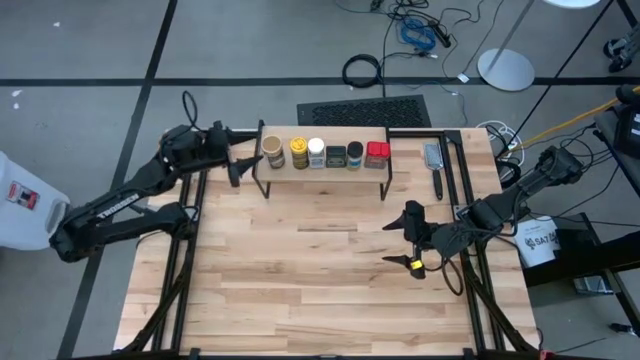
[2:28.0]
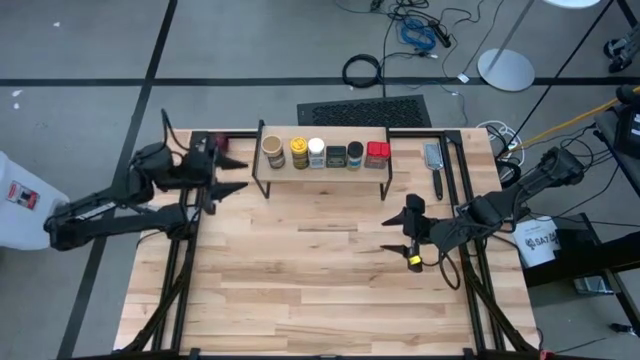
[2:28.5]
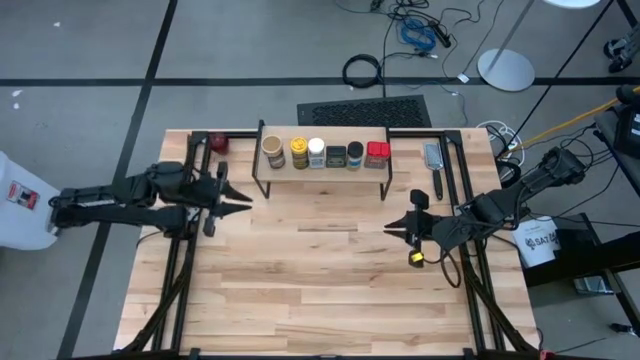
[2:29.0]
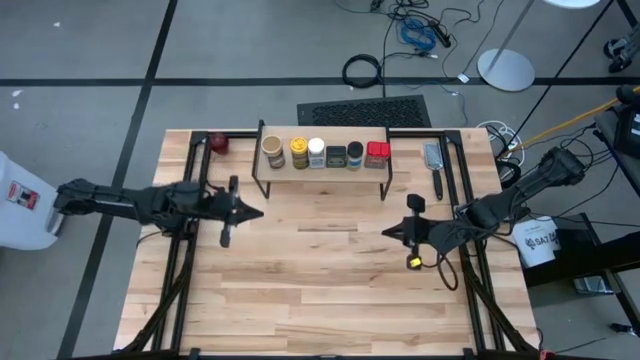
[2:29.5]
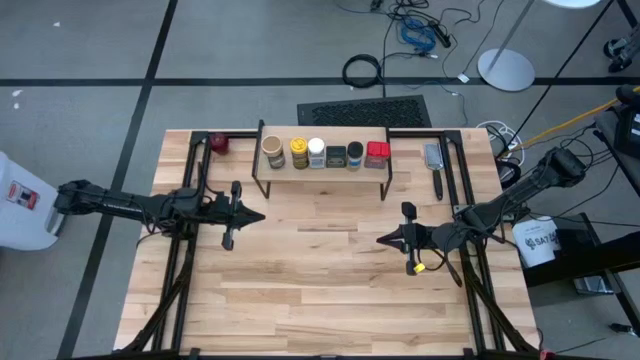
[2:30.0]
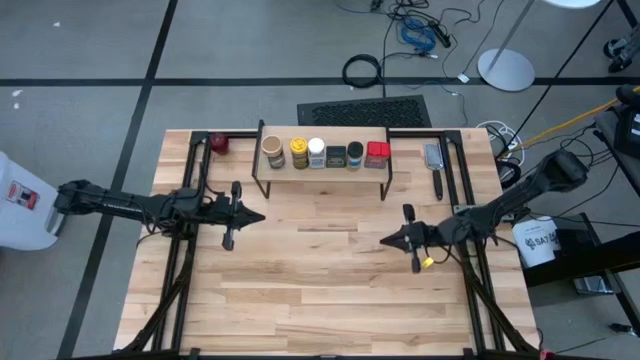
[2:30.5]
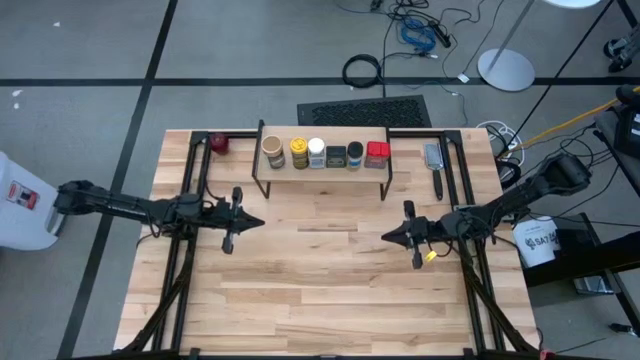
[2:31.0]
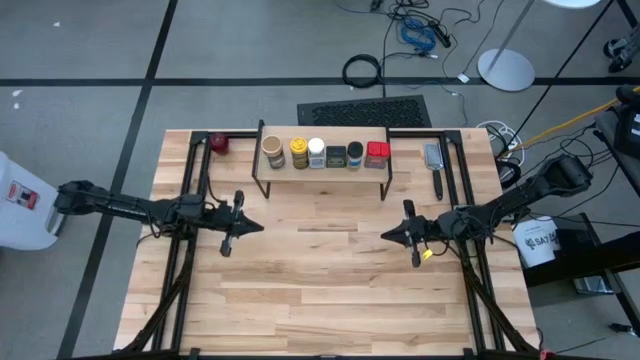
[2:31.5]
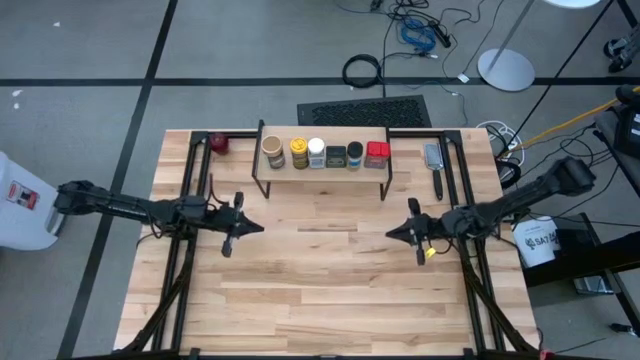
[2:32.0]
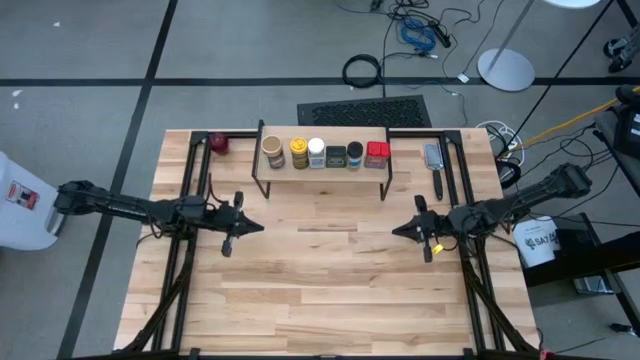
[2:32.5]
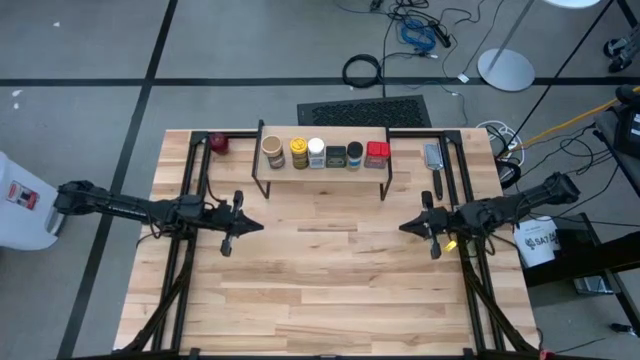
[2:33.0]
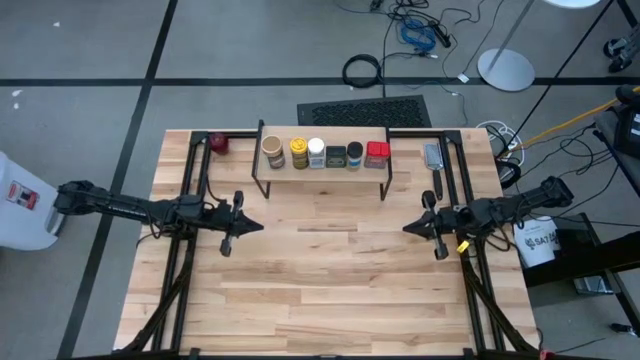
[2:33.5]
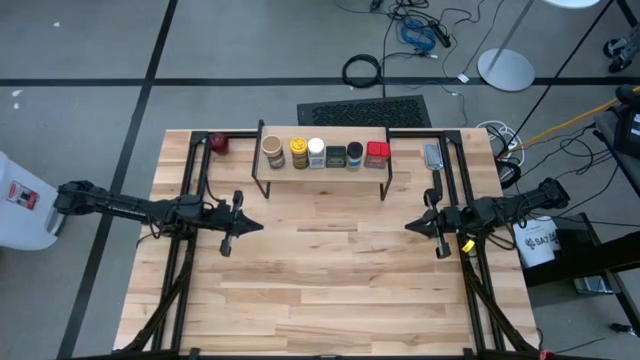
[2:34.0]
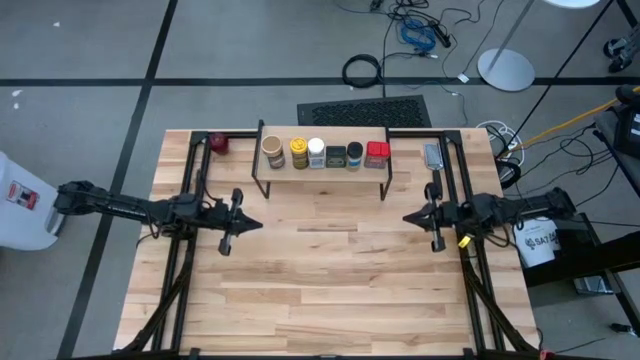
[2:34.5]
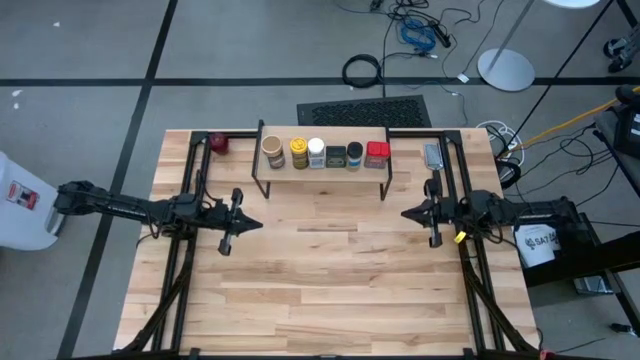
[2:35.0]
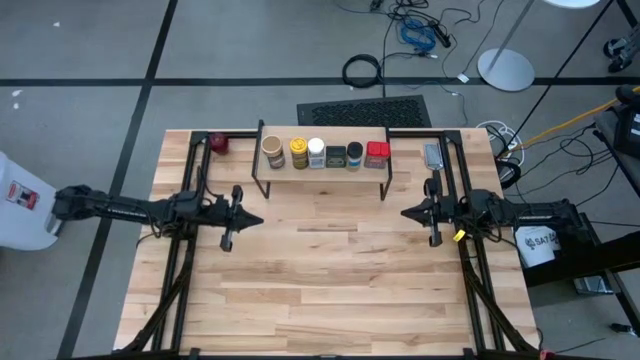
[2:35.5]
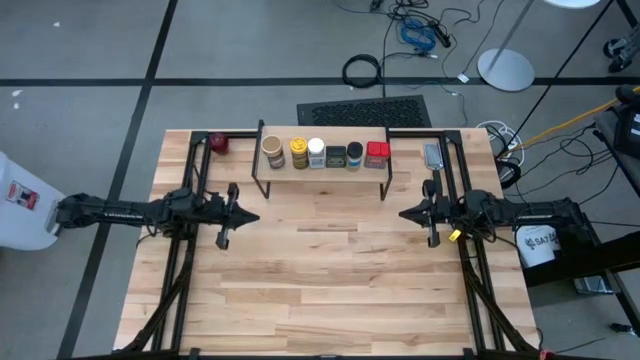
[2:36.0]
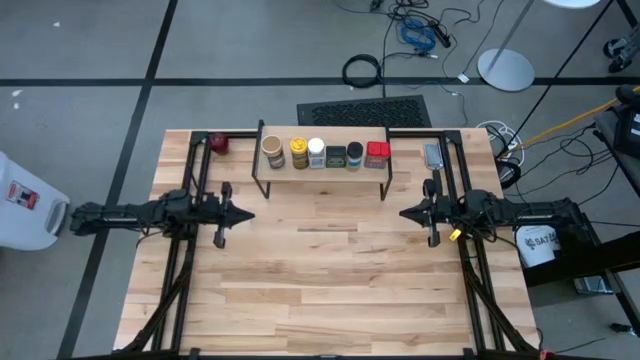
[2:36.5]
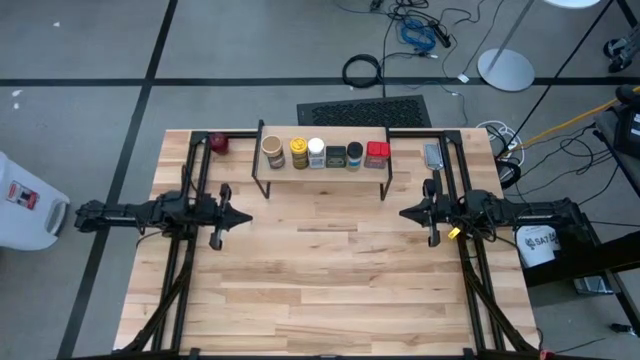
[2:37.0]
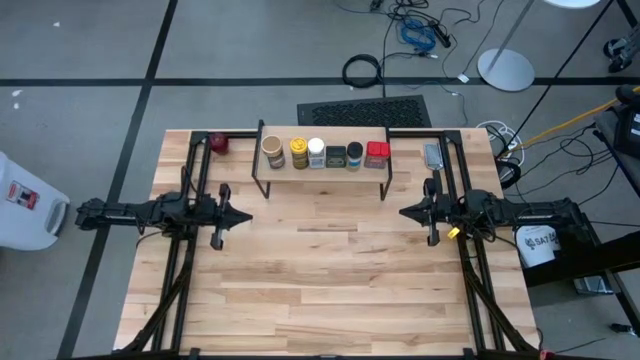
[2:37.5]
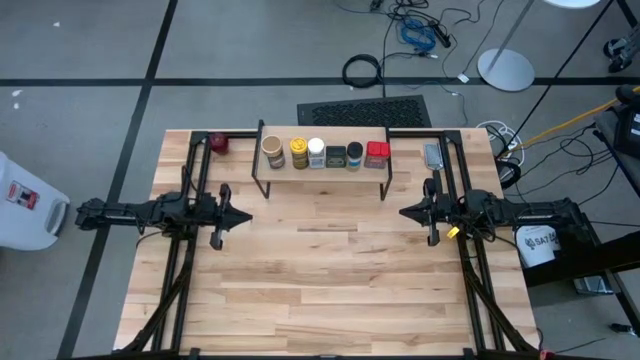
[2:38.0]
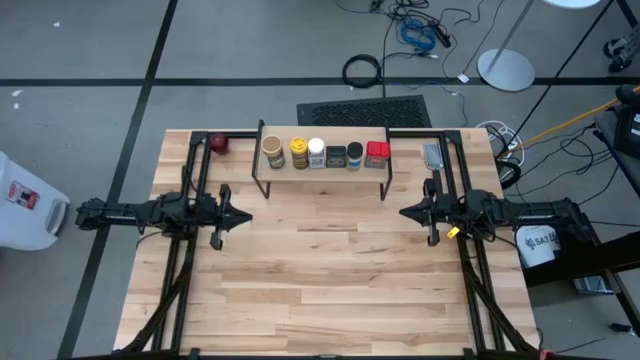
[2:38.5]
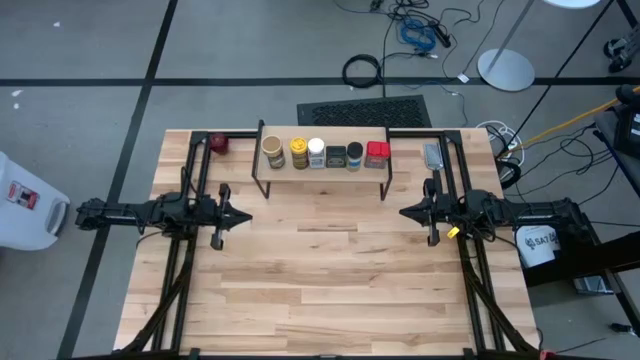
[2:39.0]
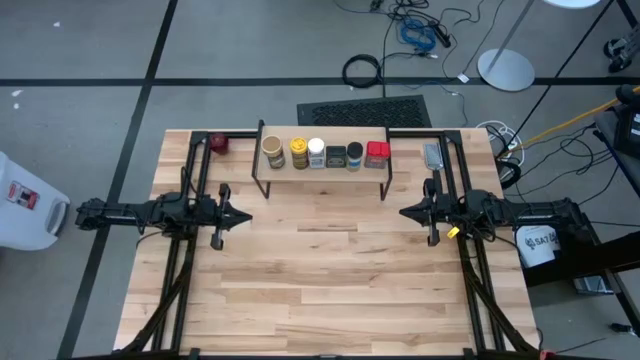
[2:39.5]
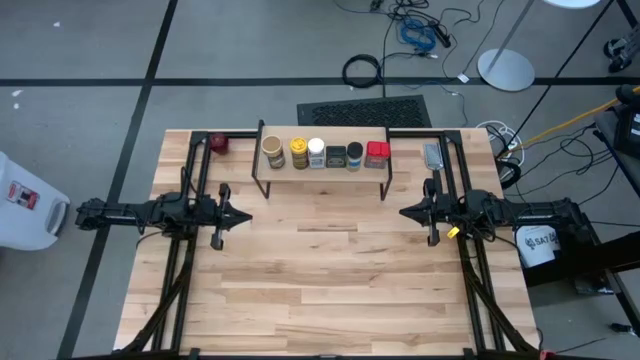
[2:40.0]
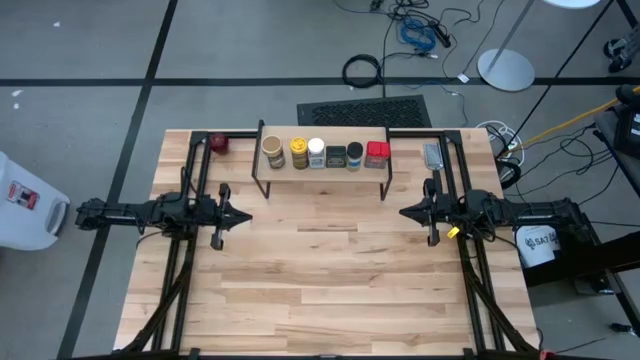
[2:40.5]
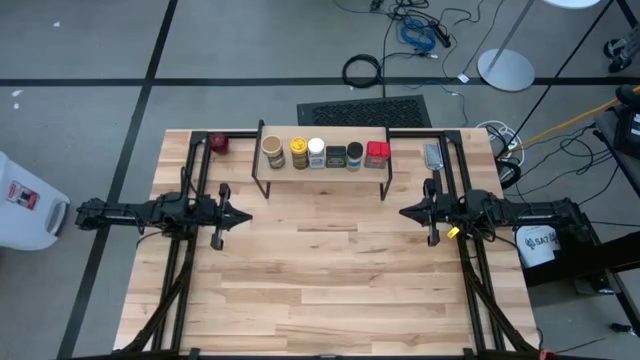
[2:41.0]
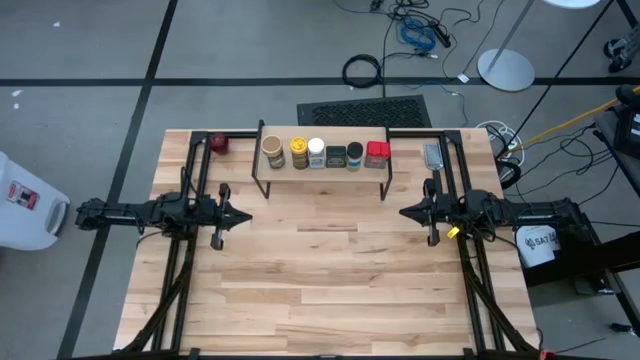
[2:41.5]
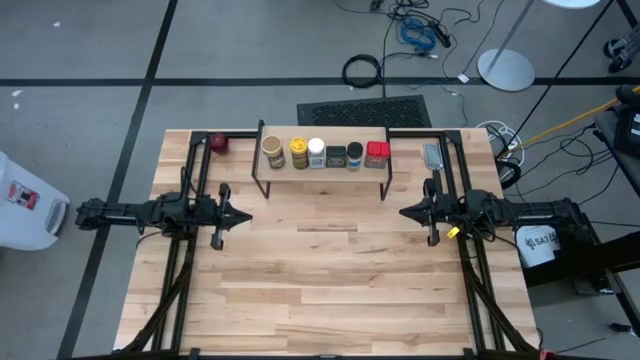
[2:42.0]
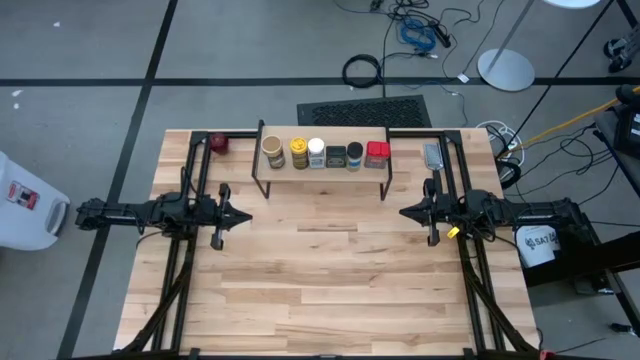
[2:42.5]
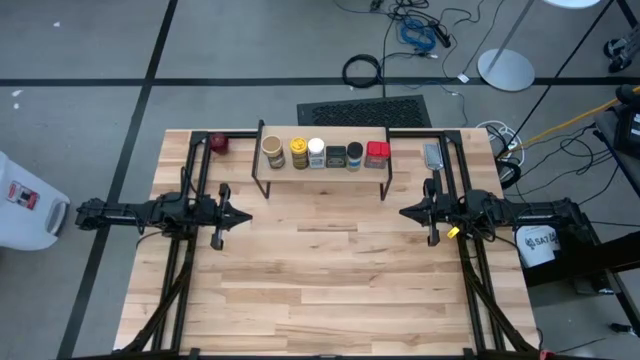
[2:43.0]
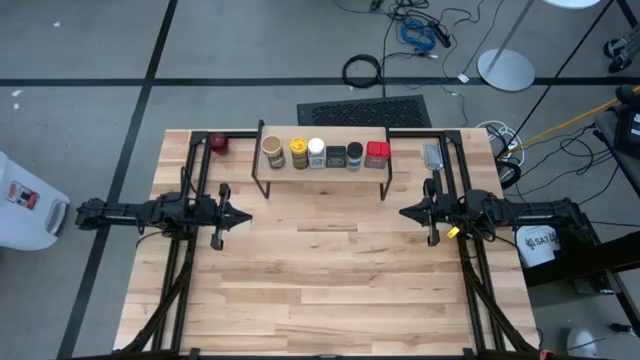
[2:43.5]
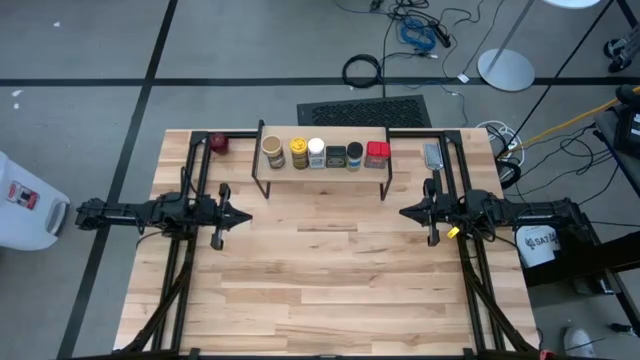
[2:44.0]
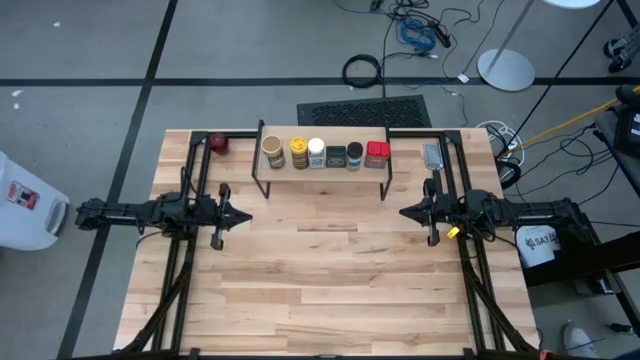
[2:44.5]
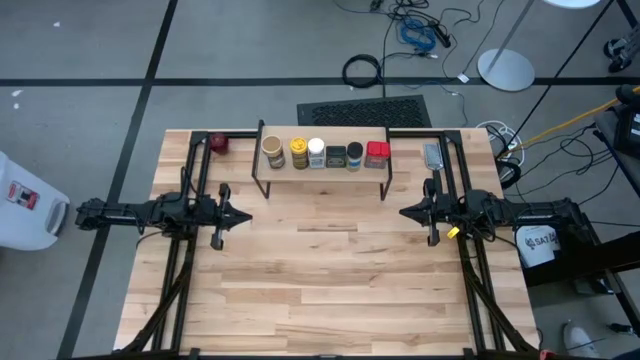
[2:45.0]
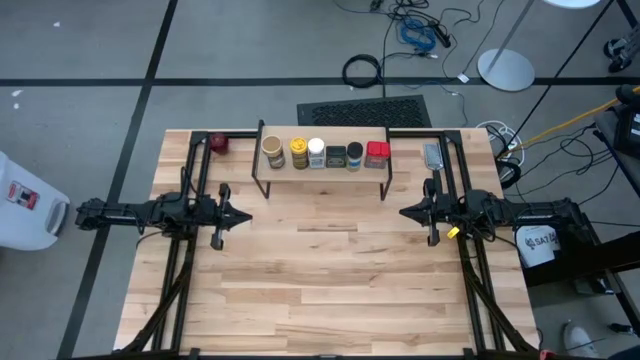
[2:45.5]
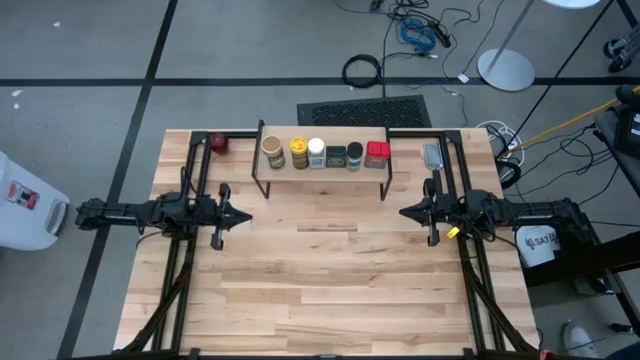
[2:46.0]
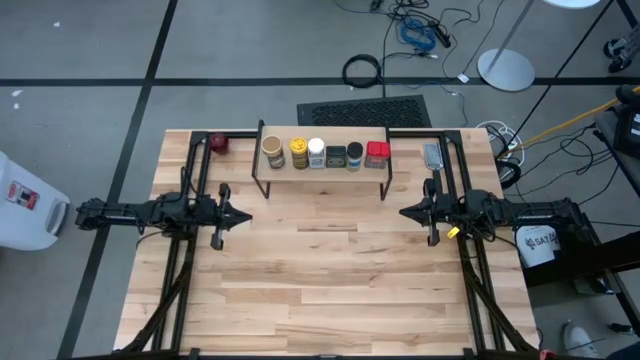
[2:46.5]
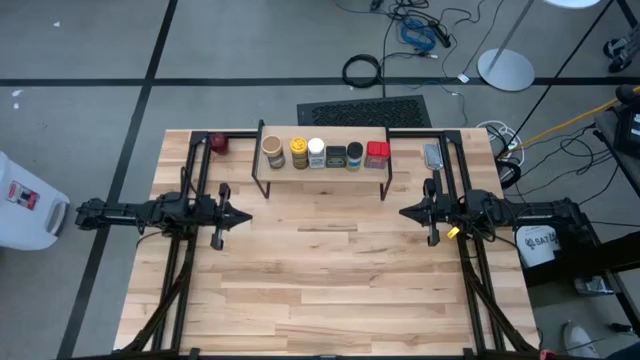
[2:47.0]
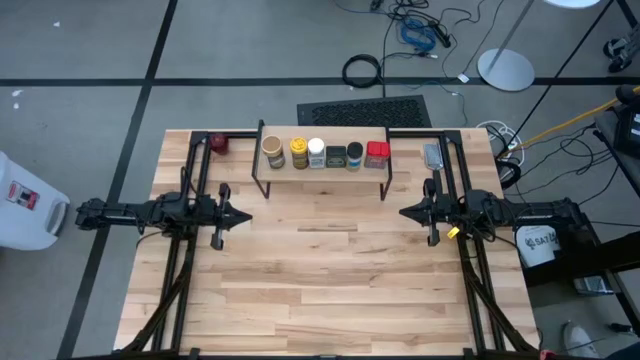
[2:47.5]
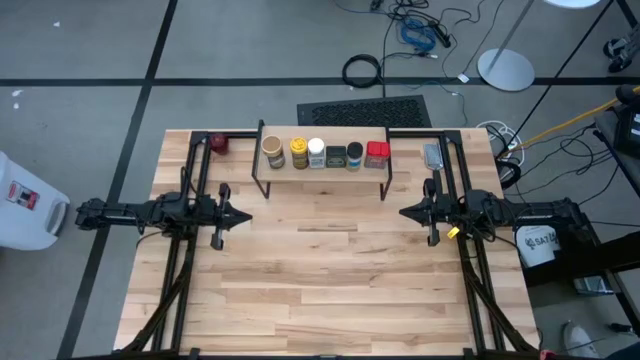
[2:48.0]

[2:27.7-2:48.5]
Task: Shelf spices
Return to Home Position
